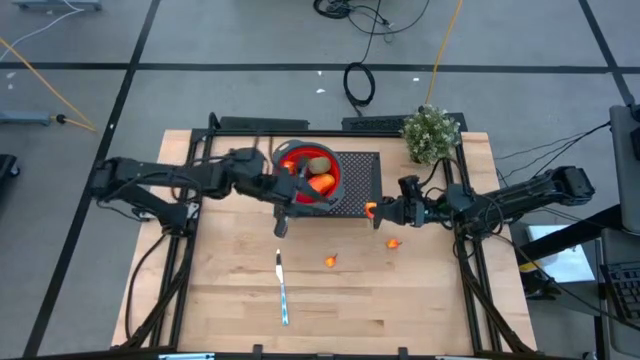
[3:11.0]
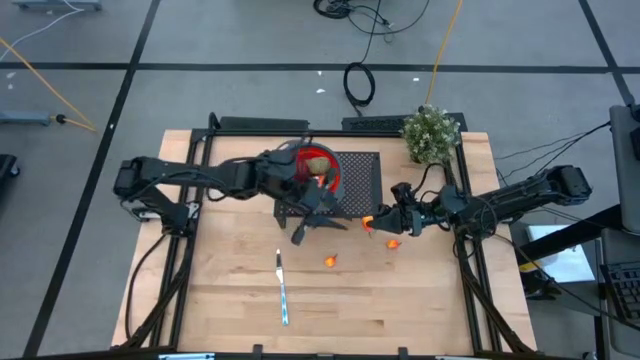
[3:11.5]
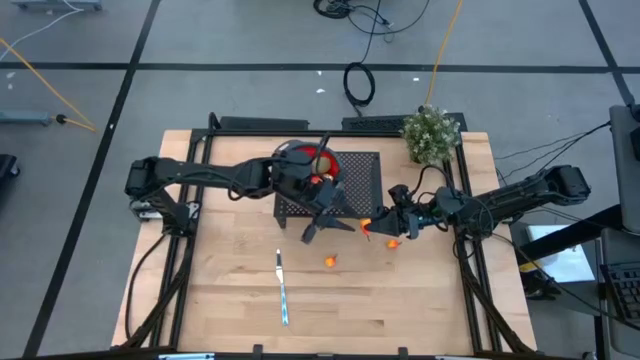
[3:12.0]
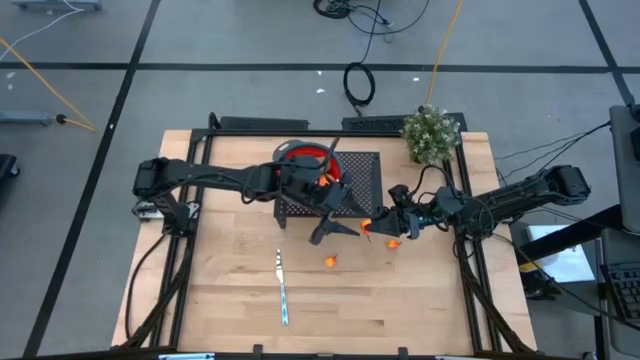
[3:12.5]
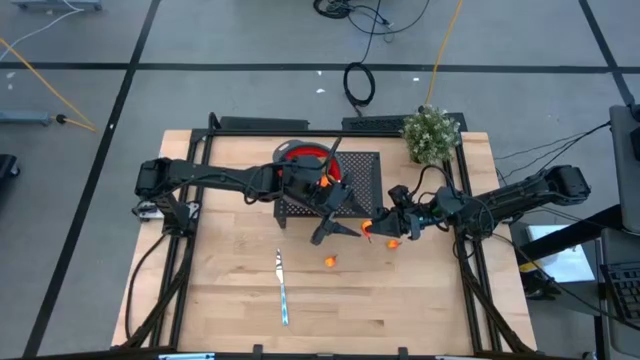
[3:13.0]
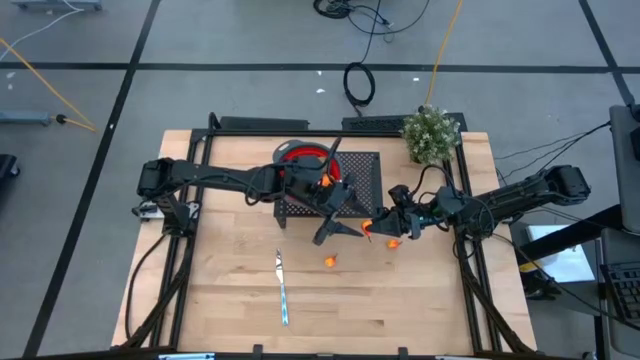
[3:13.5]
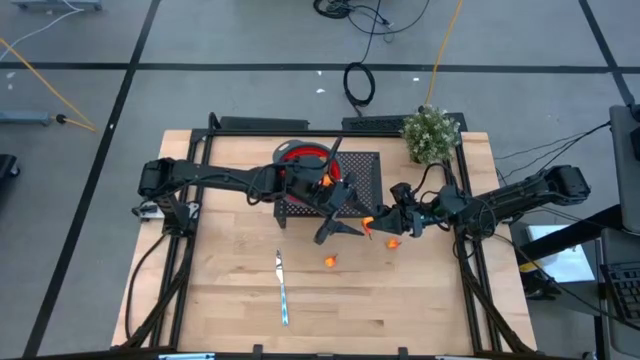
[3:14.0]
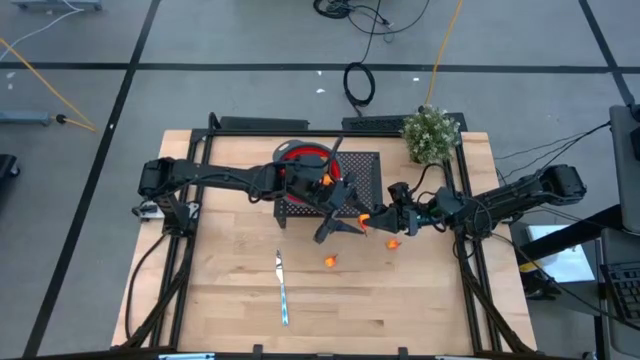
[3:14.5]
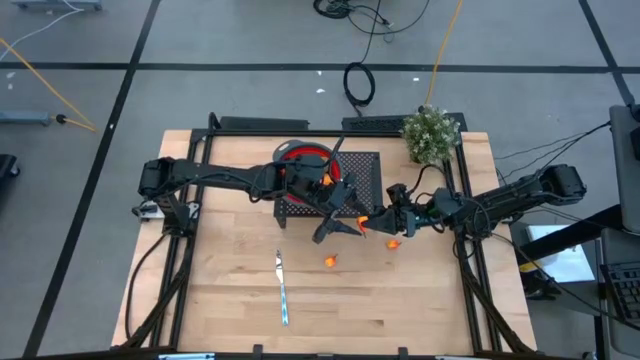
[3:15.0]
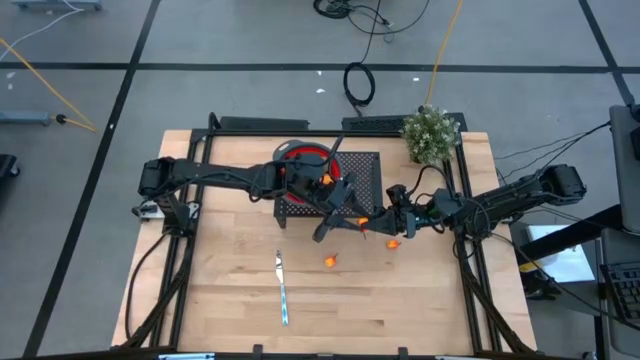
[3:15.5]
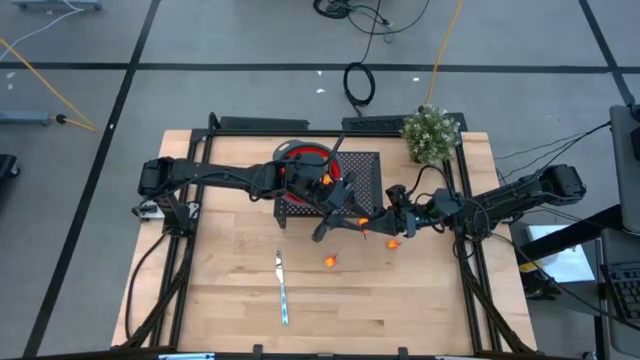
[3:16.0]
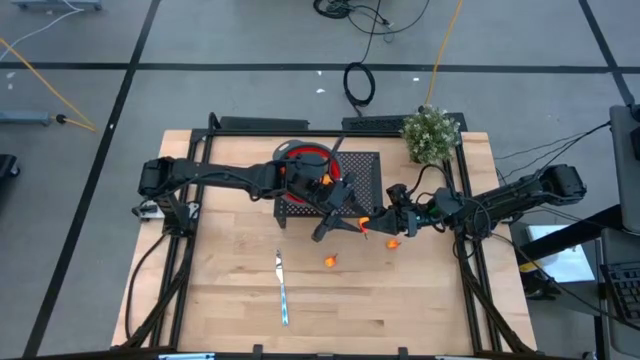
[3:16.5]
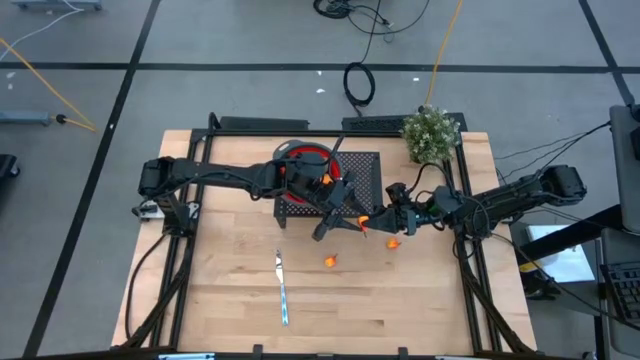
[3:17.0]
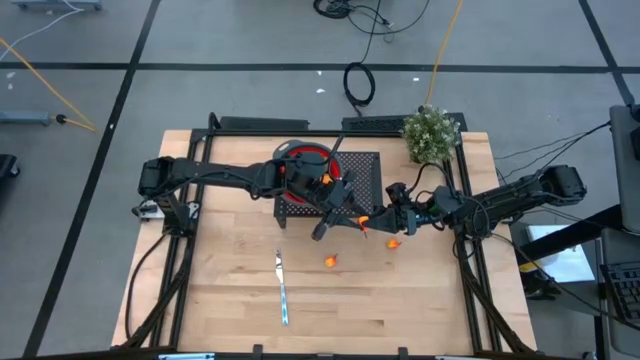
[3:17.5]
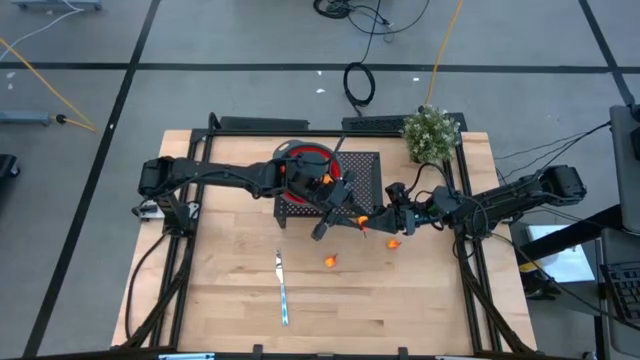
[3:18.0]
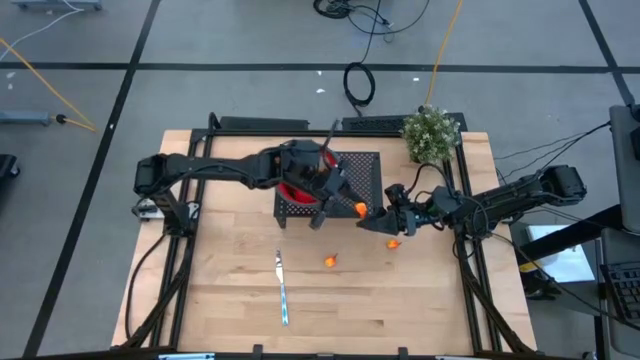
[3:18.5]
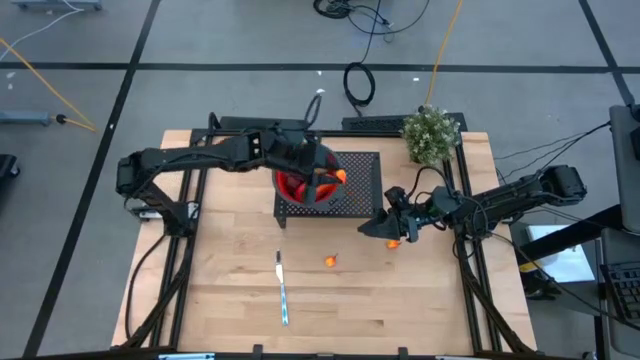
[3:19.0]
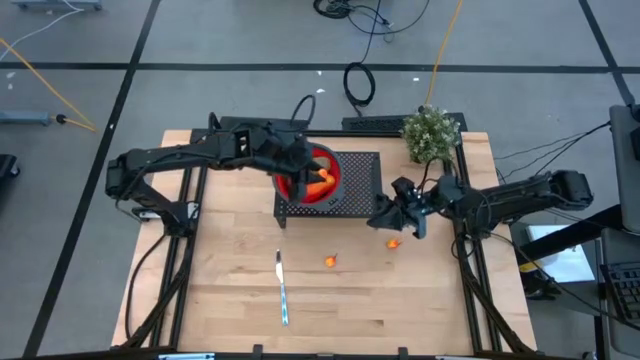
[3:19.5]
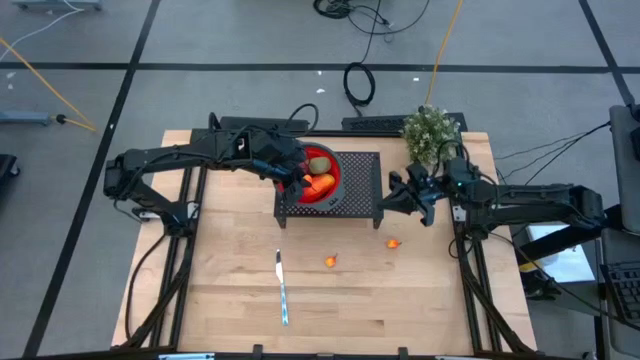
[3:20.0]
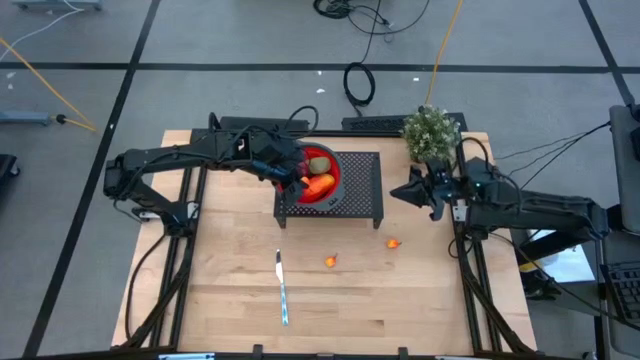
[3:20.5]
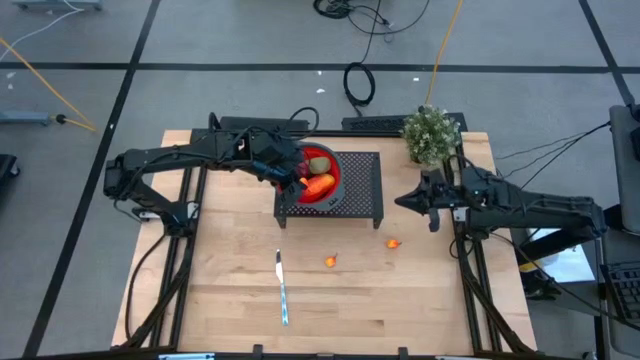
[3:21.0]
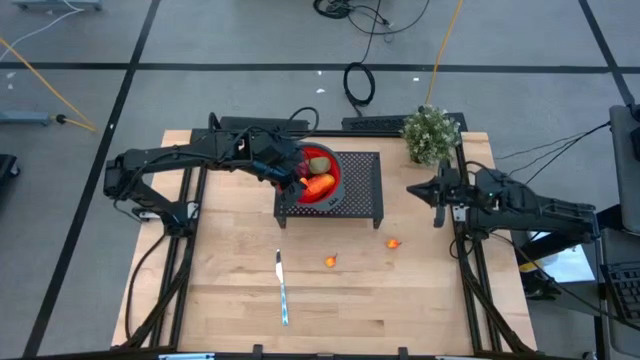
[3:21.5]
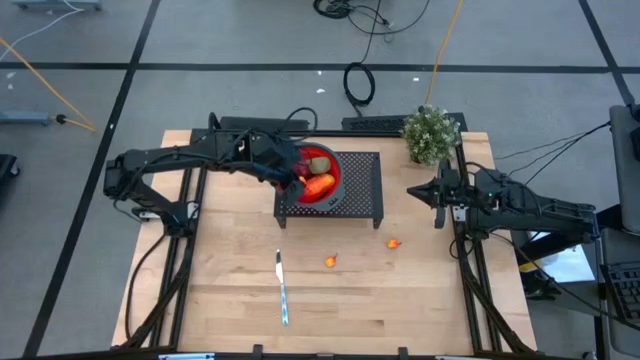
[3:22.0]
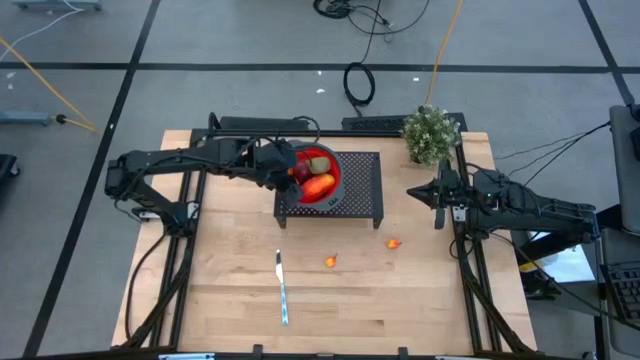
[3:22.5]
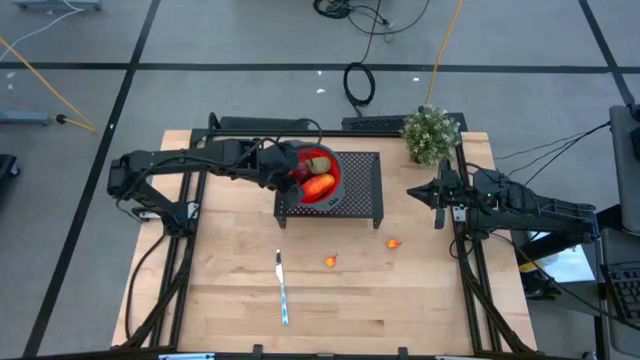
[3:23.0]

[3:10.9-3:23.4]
Task: Pick & Place Fruit
Put the top right peach into the strainer on the shelf

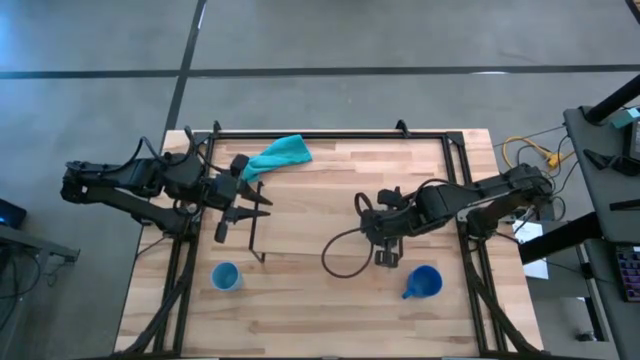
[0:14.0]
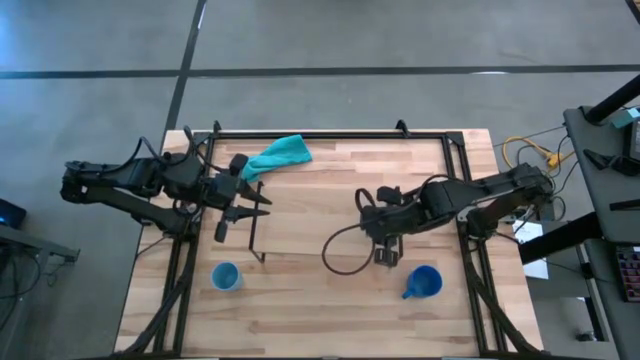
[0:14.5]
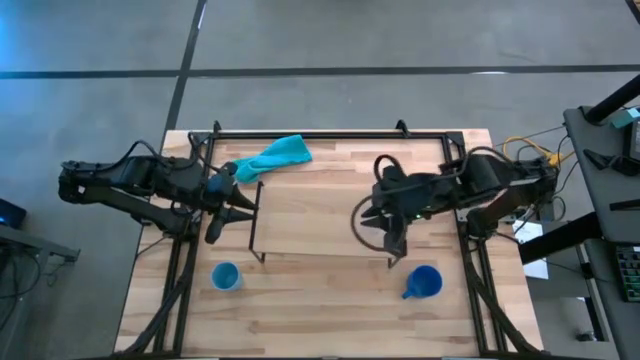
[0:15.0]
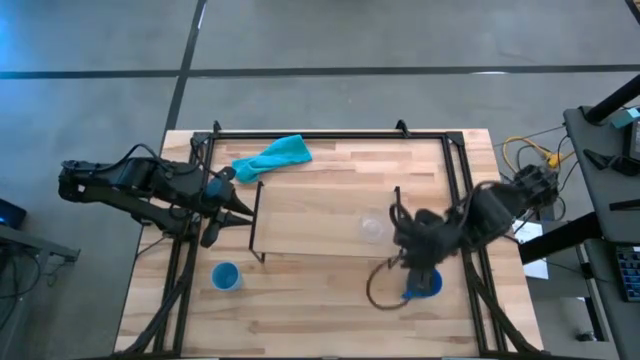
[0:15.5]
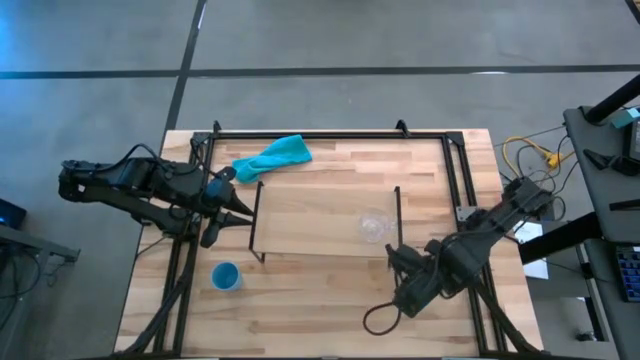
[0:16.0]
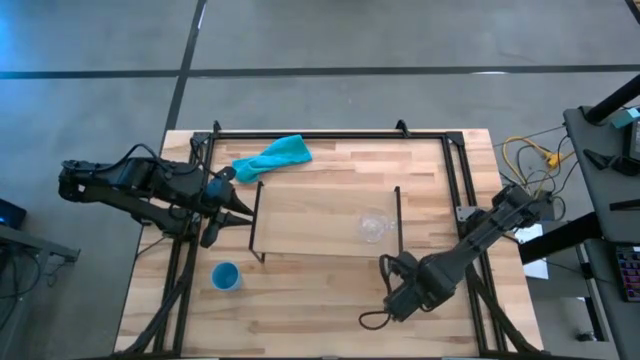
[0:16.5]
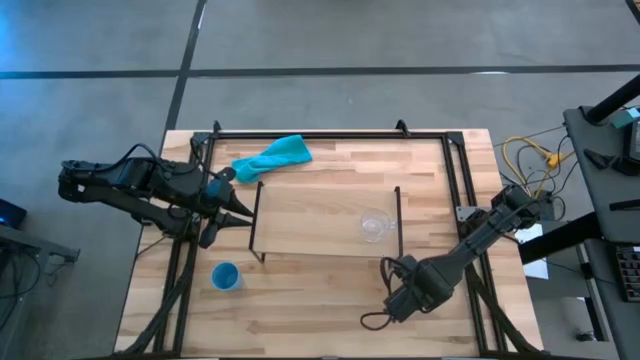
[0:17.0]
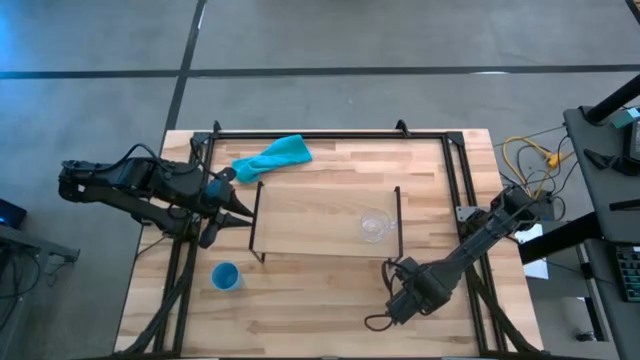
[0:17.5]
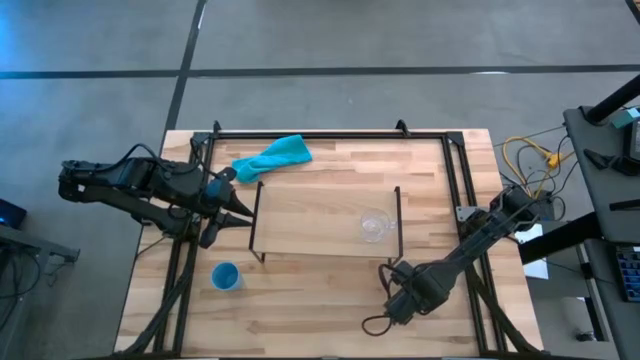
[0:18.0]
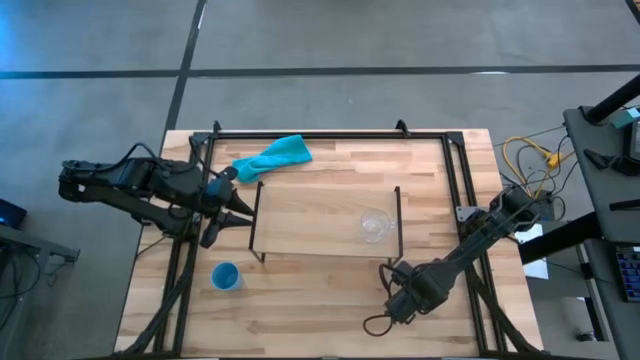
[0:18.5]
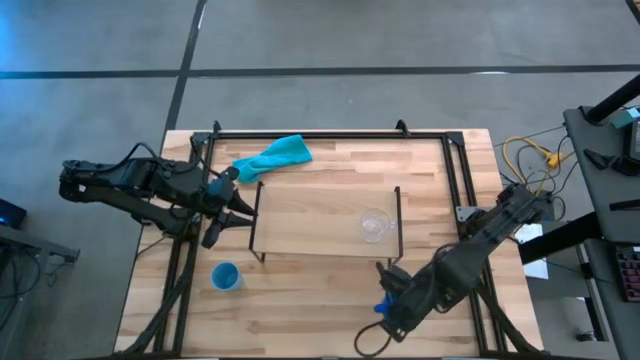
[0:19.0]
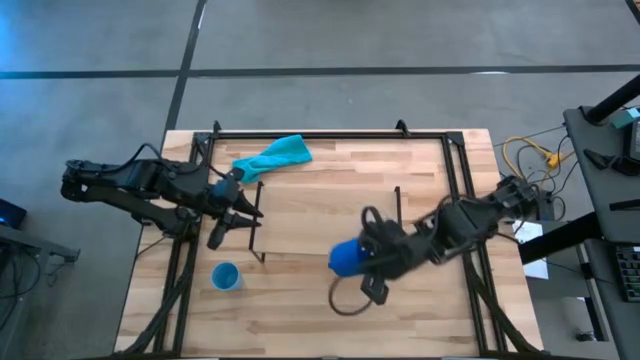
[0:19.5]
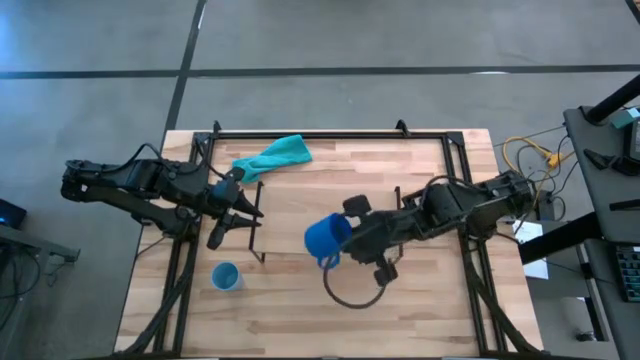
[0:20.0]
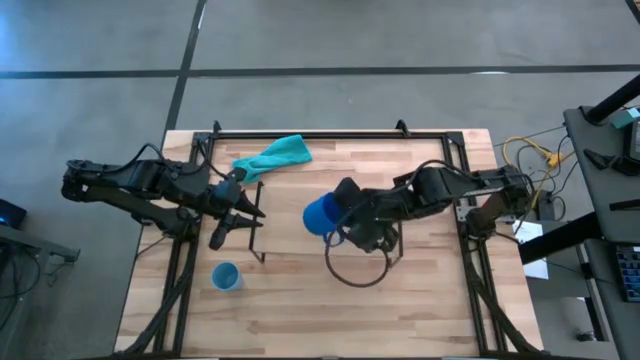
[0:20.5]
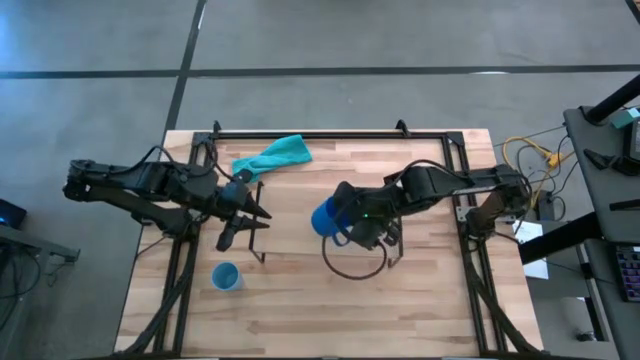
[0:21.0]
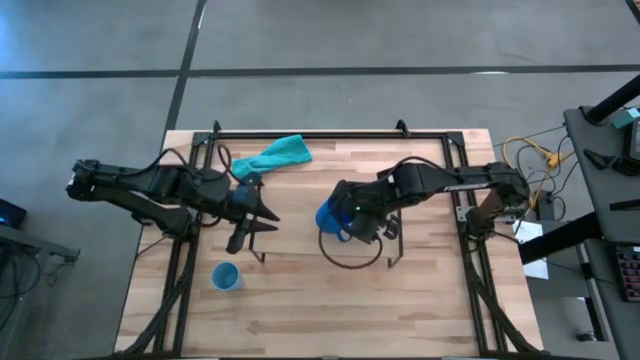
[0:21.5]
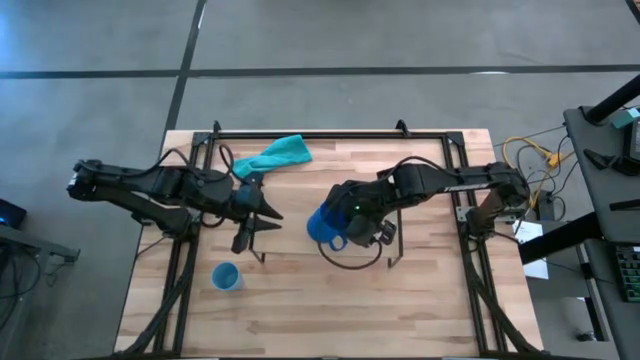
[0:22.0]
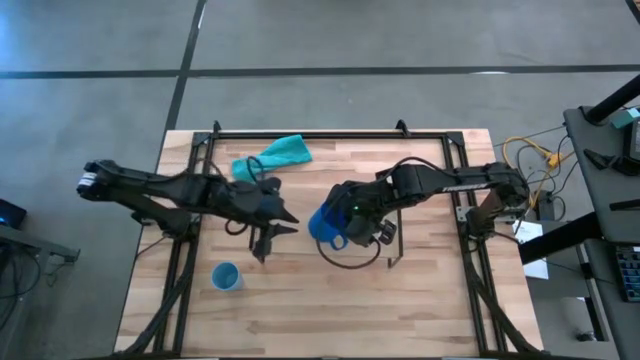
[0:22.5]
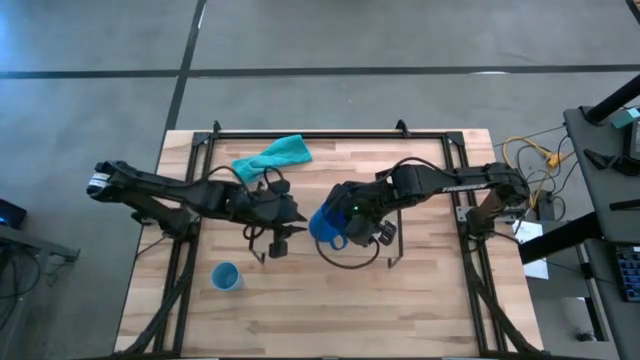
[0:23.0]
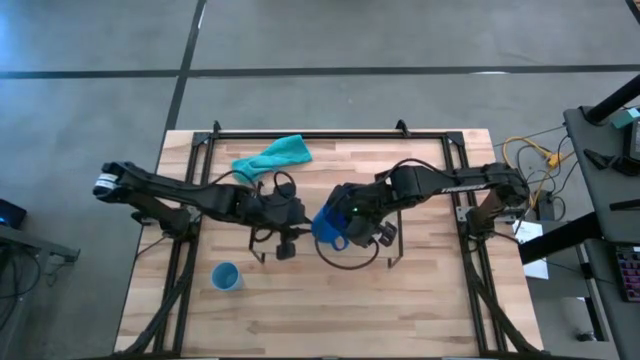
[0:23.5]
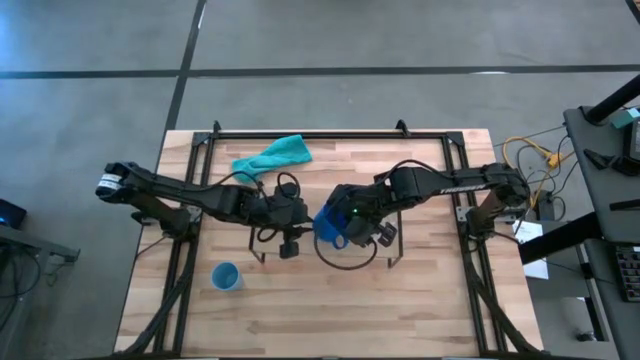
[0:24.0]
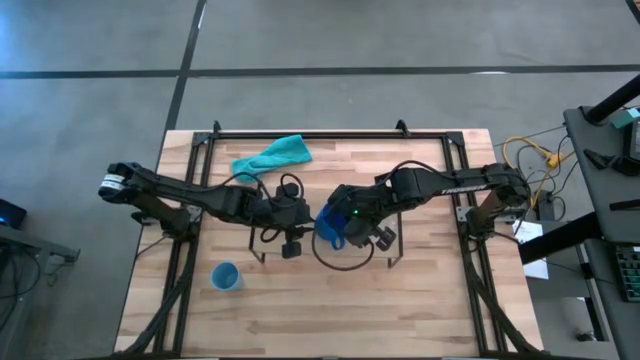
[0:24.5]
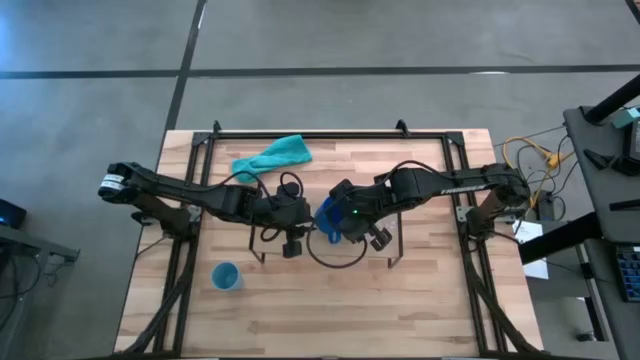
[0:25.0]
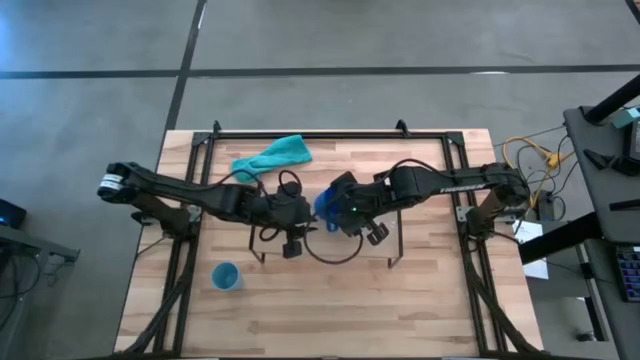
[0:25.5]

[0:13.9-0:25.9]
Task: Stack small to large cups/mugs on shelf
Put the blue cup on the shelf
